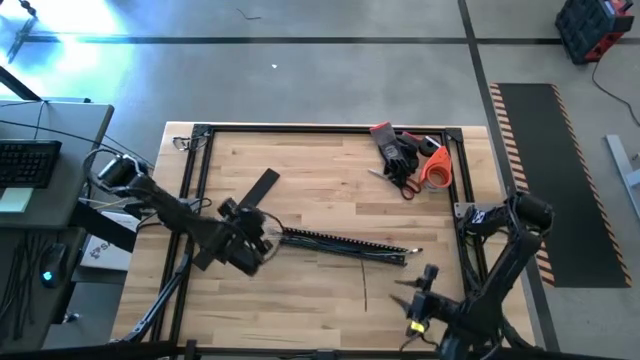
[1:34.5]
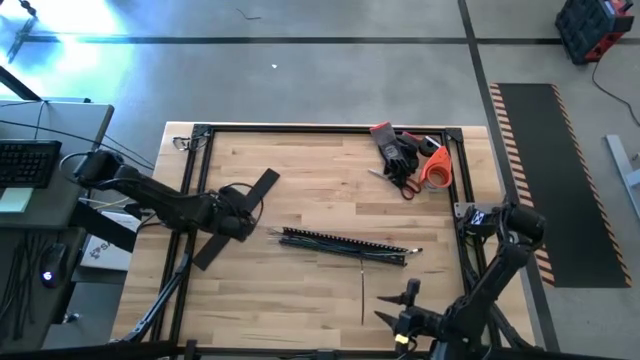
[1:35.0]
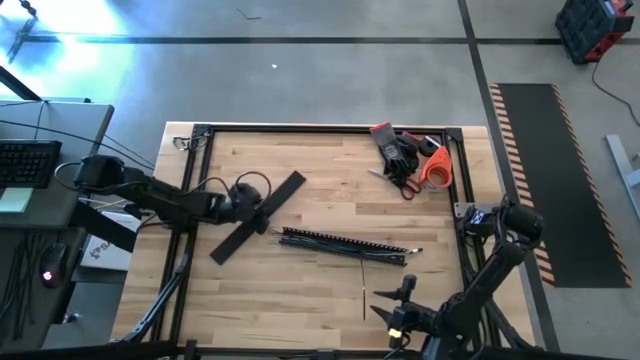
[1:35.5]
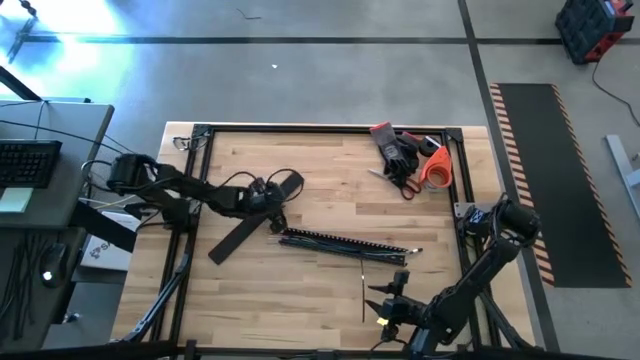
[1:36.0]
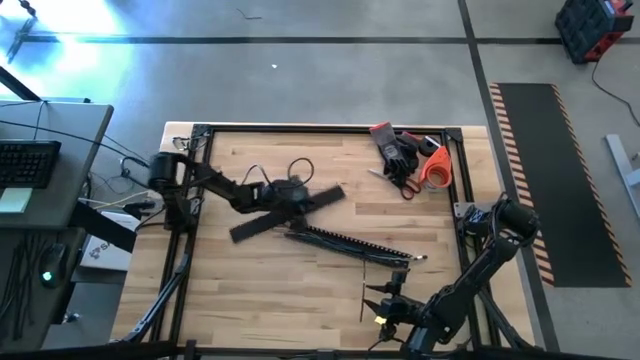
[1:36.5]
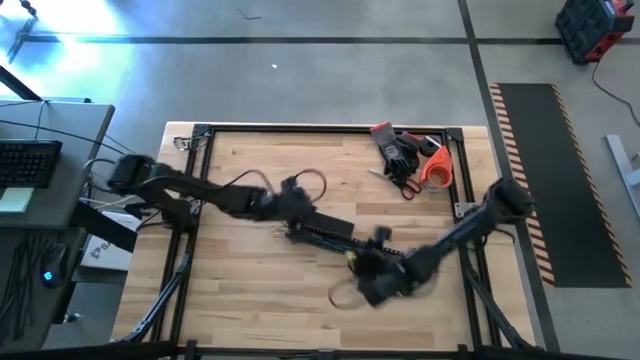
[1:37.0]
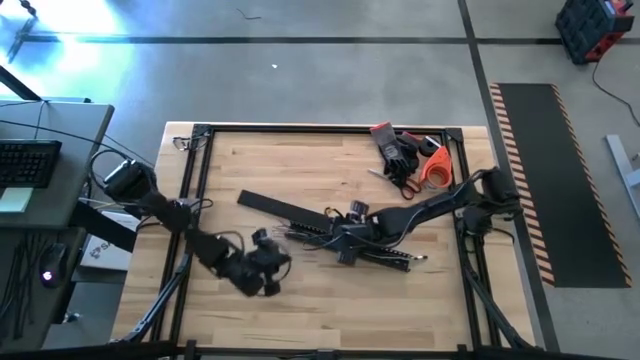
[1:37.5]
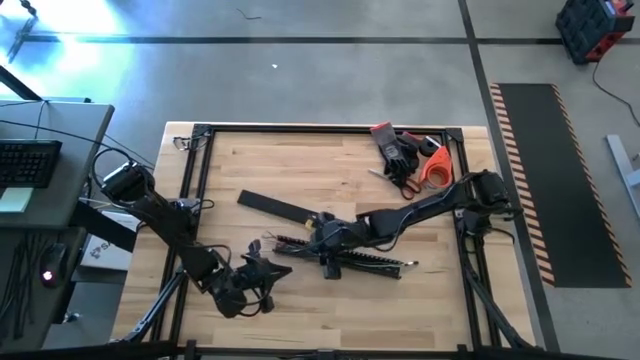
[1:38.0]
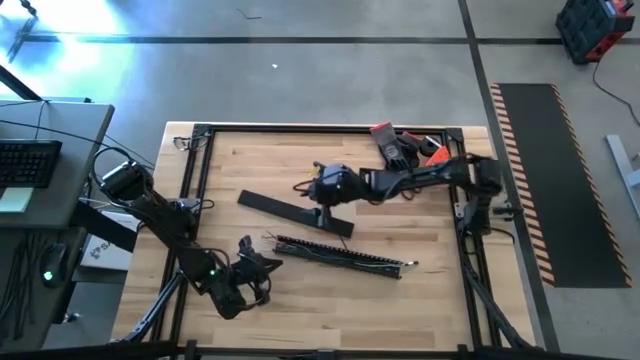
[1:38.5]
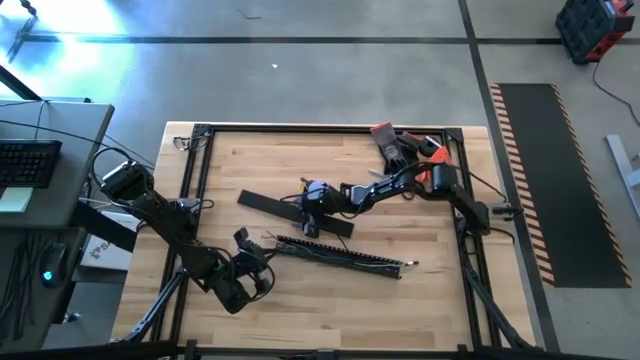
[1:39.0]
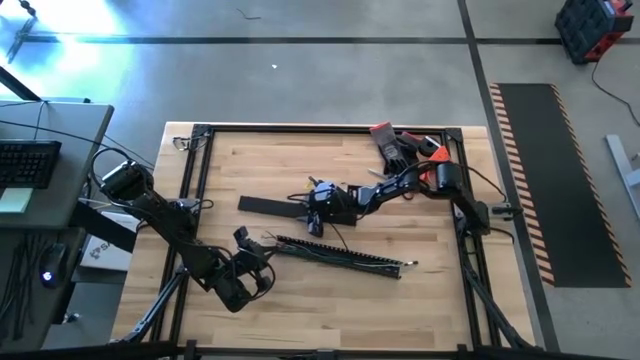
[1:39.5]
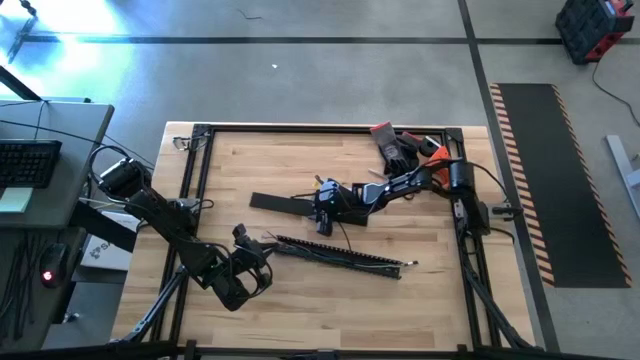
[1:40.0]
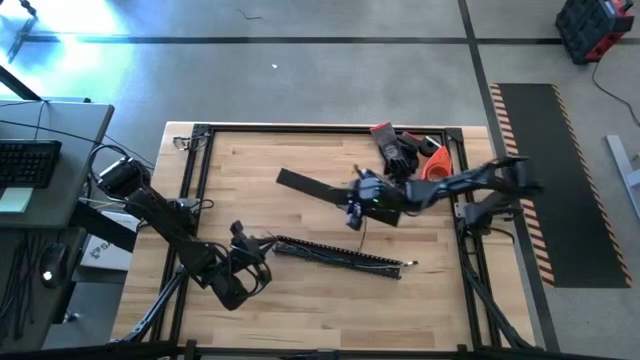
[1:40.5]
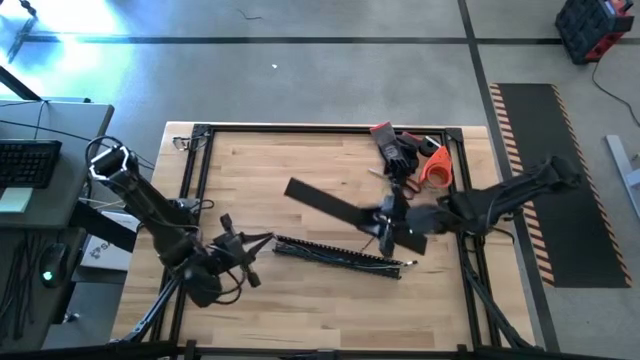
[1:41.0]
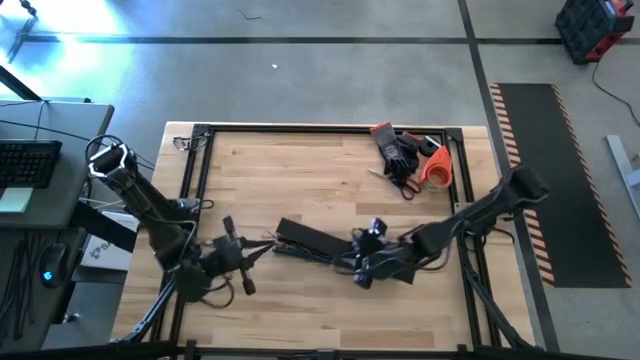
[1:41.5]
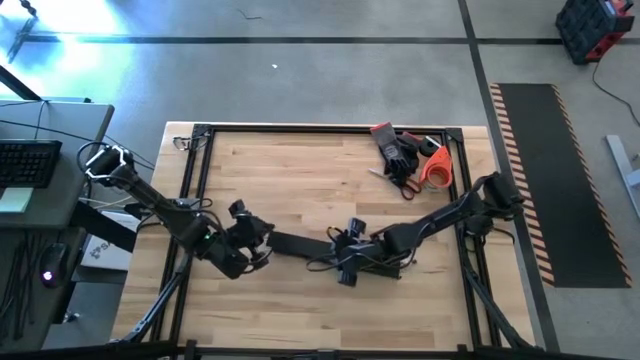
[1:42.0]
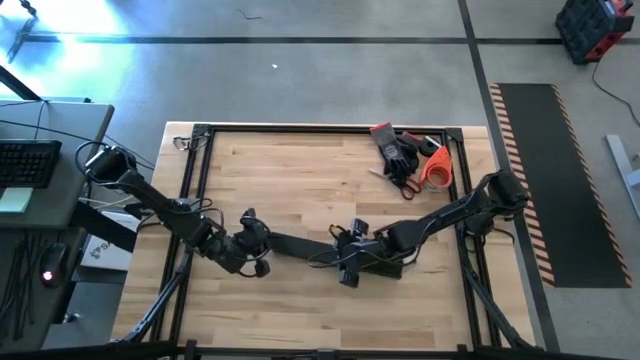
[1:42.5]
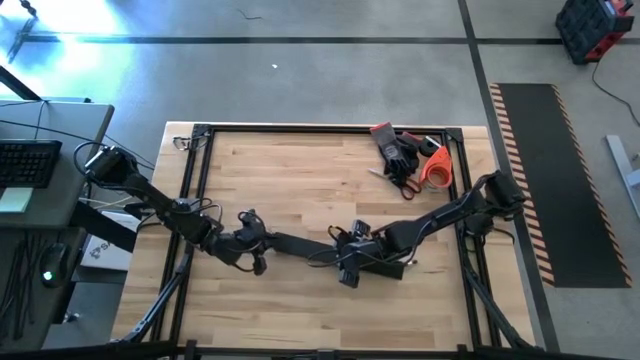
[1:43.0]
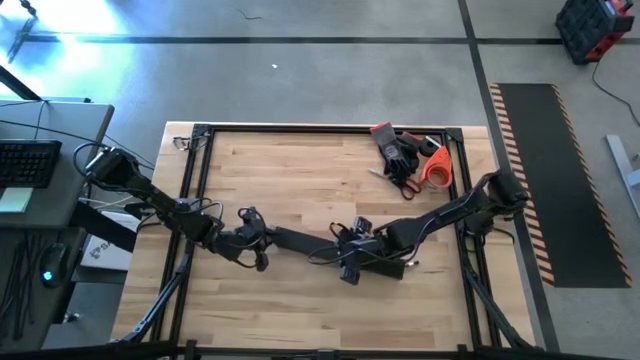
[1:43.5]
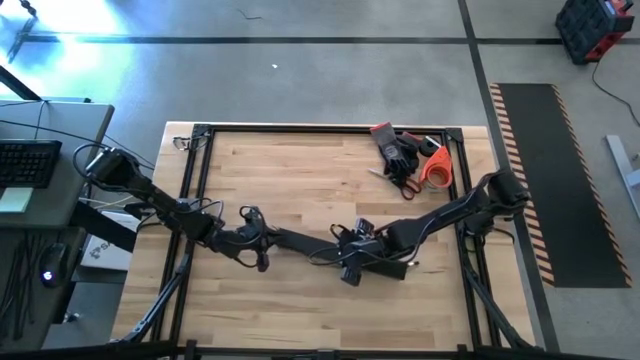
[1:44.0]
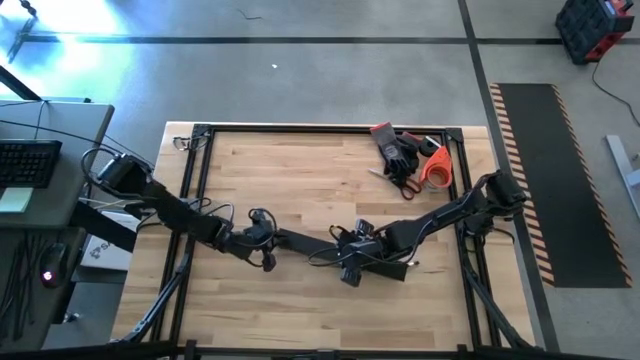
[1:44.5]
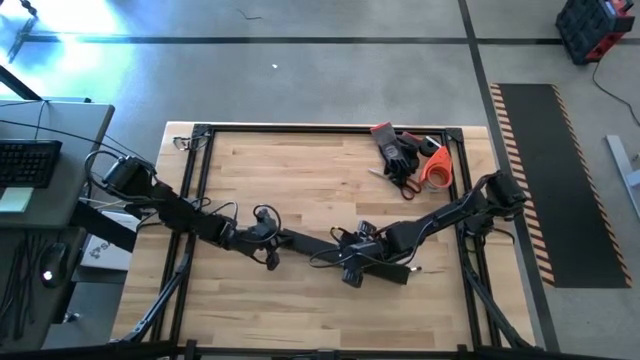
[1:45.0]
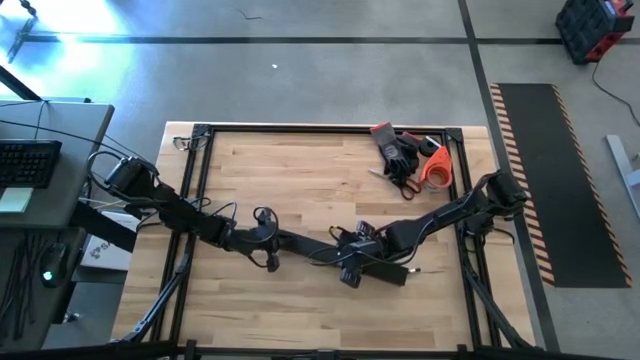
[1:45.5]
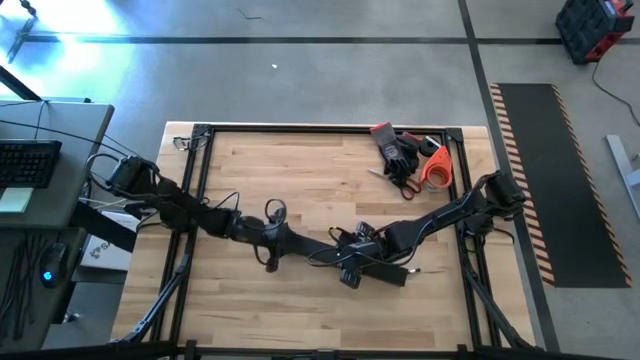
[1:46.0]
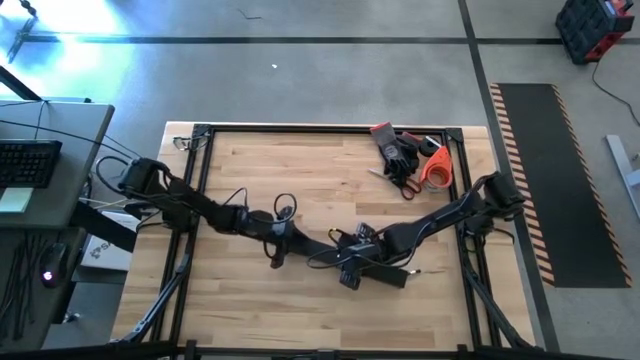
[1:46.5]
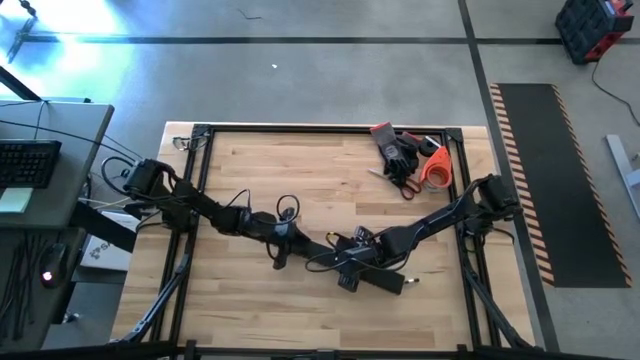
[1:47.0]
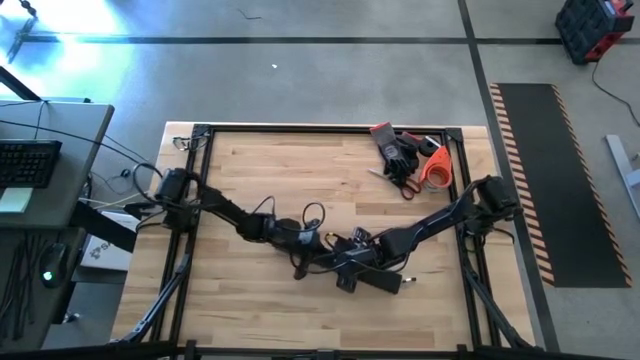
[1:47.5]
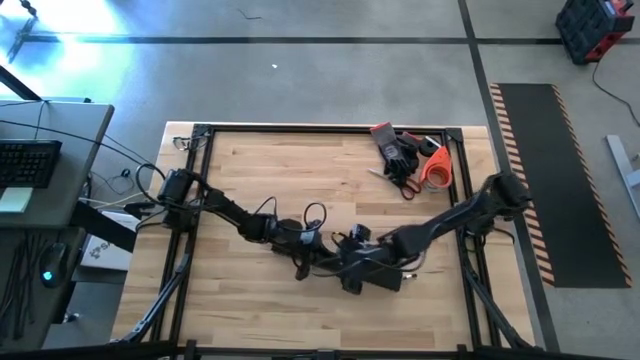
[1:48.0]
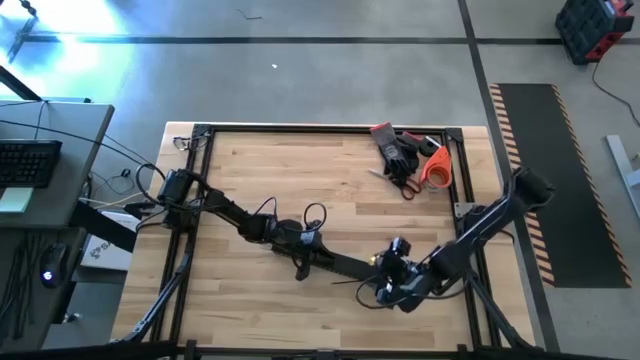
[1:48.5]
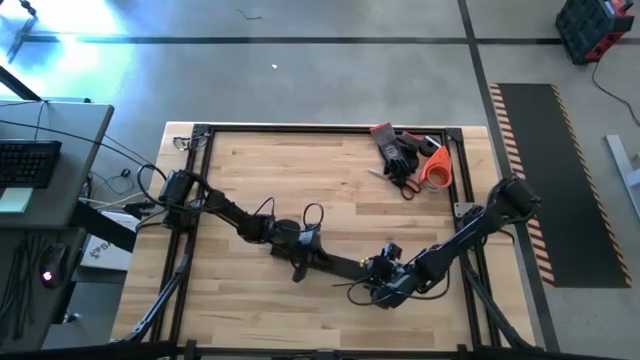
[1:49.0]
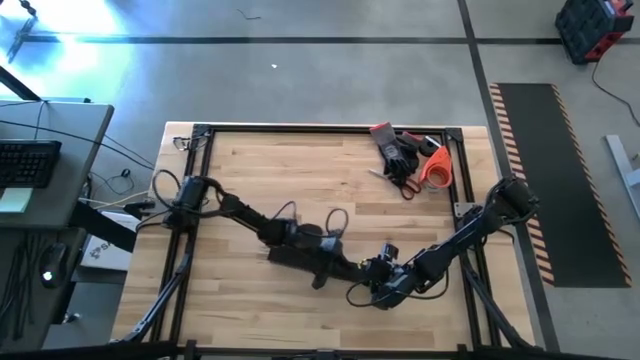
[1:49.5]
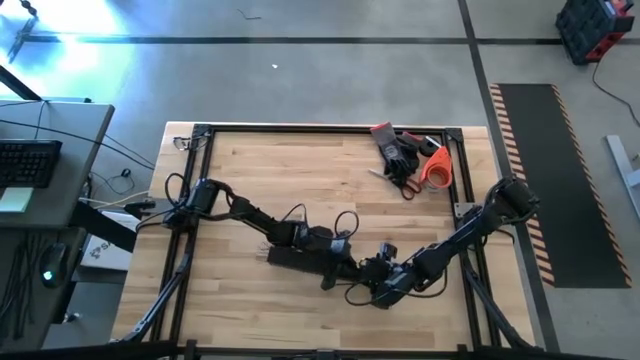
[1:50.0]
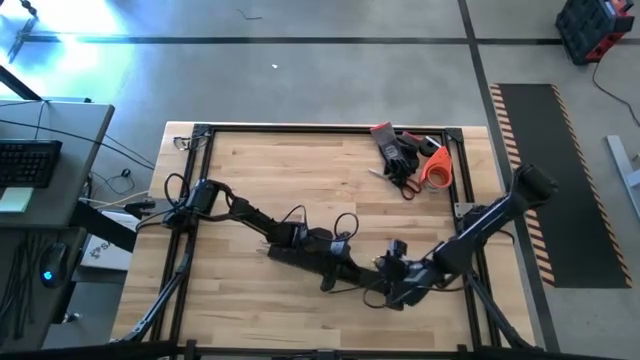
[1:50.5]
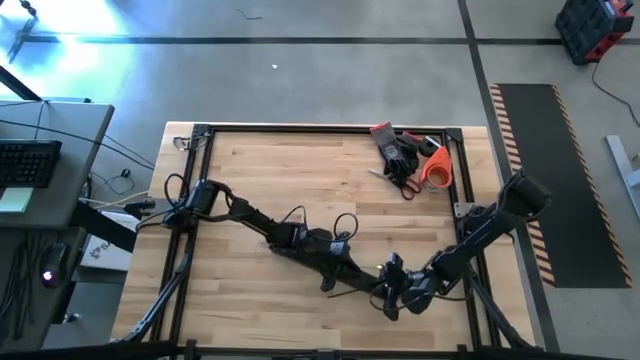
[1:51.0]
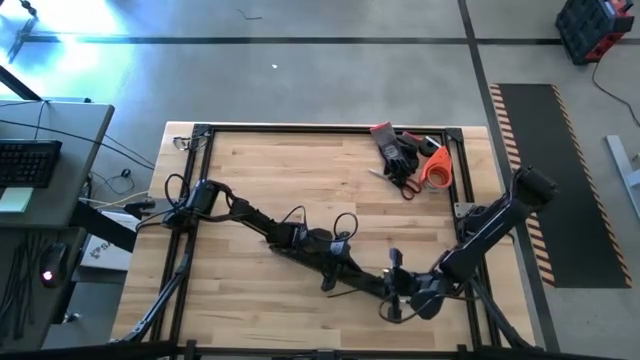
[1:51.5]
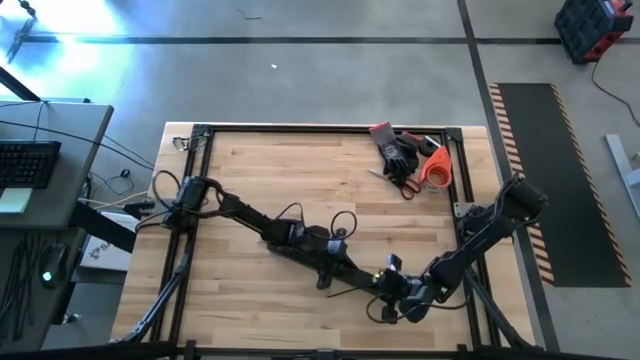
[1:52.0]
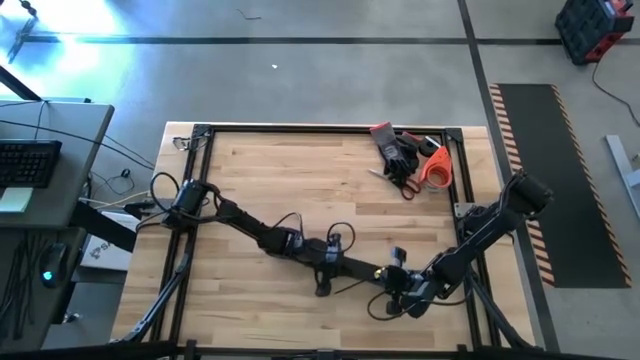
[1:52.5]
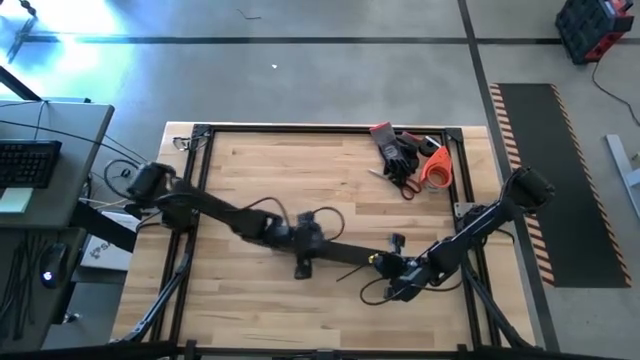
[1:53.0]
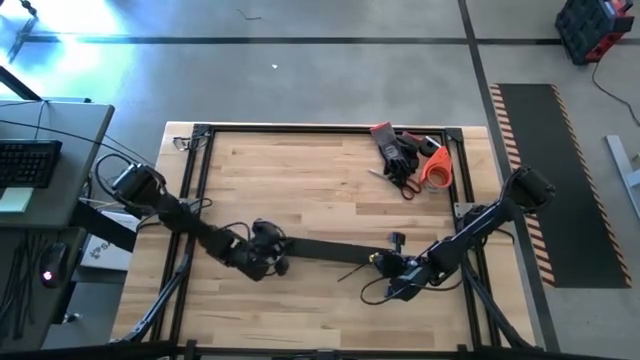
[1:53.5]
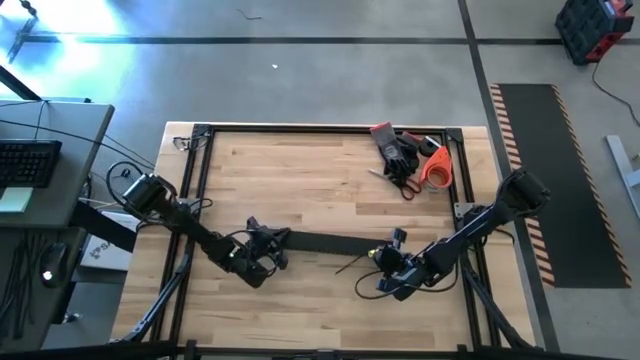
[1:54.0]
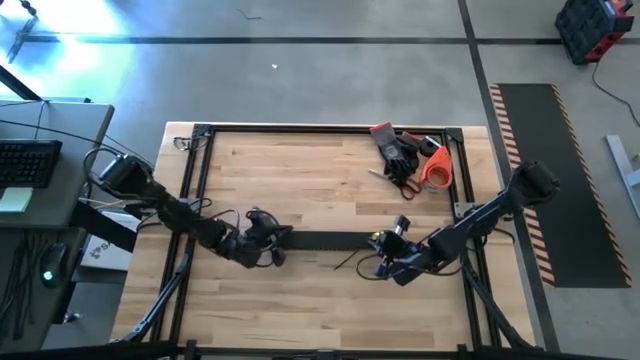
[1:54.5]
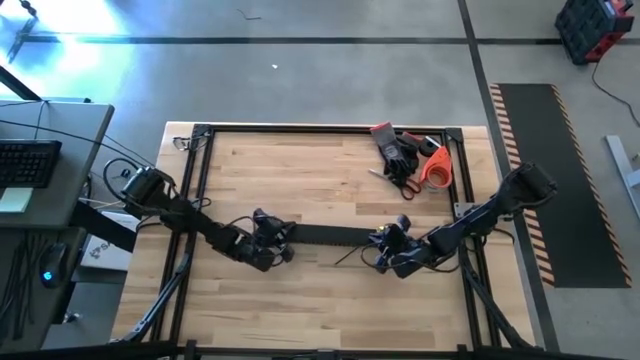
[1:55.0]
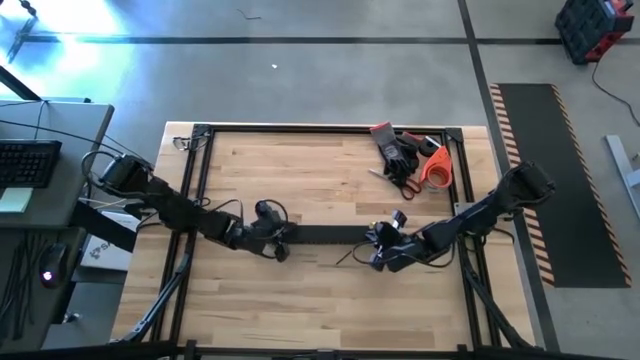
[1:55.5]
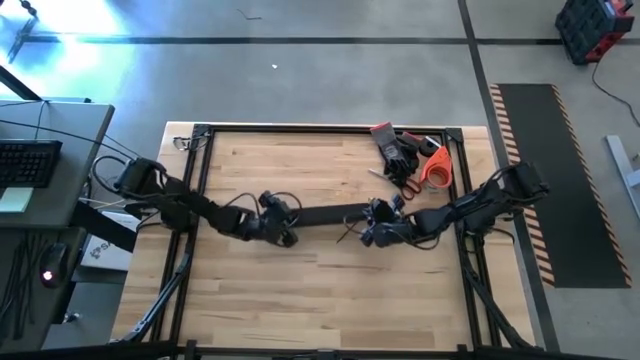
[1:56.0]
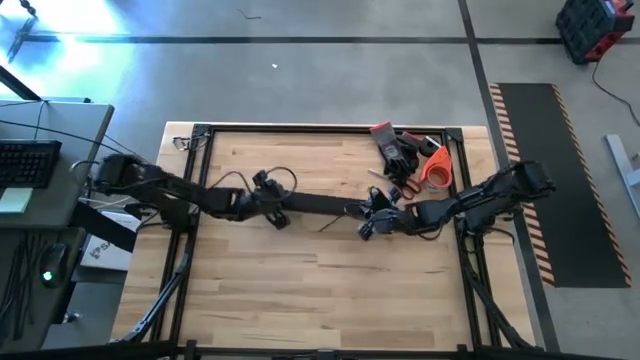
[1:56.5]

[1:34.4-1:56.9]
Task: Ziptie cables
Close the black cable duct
